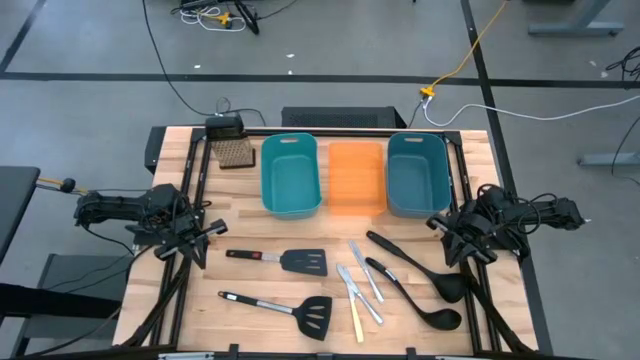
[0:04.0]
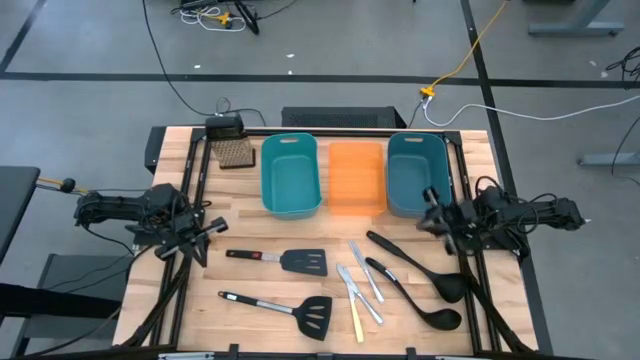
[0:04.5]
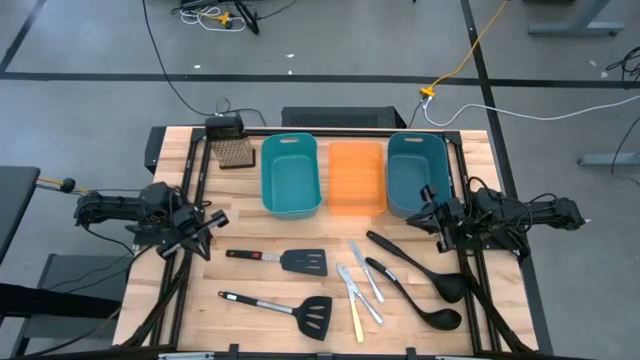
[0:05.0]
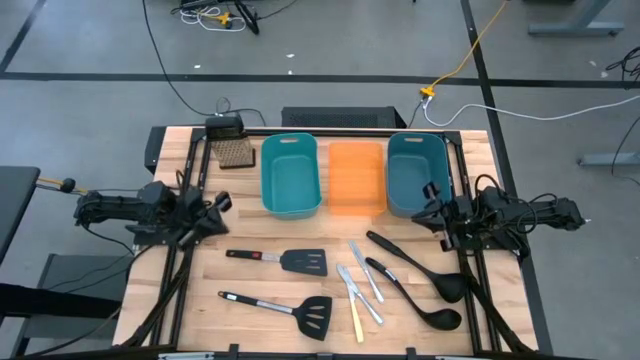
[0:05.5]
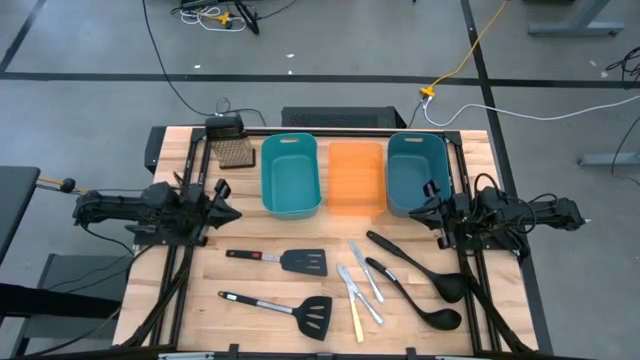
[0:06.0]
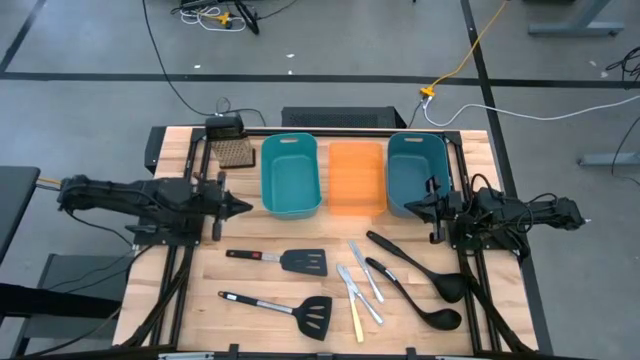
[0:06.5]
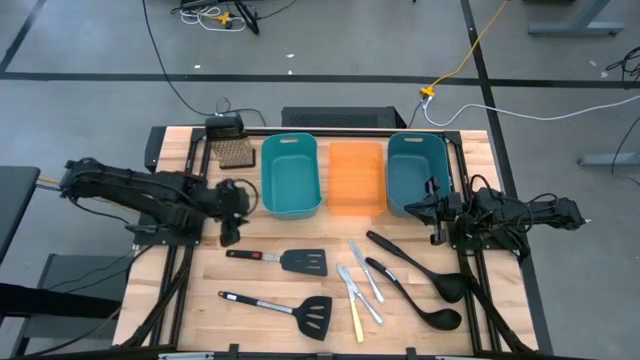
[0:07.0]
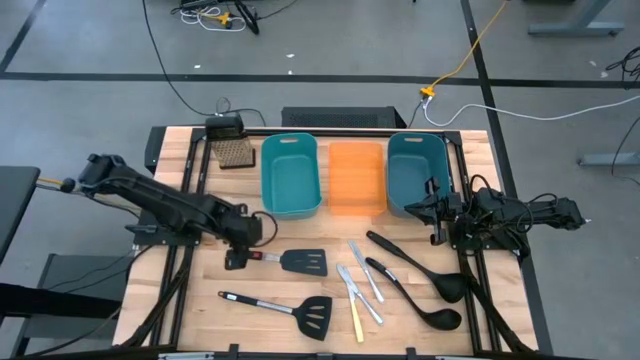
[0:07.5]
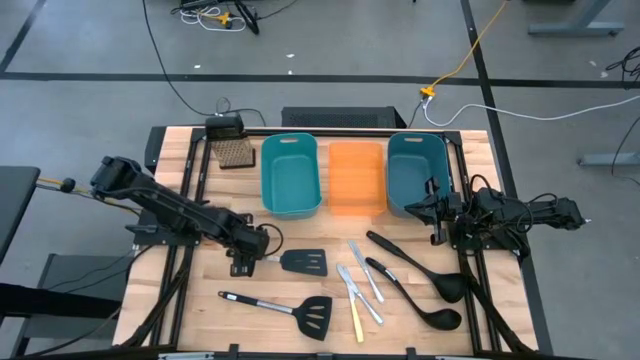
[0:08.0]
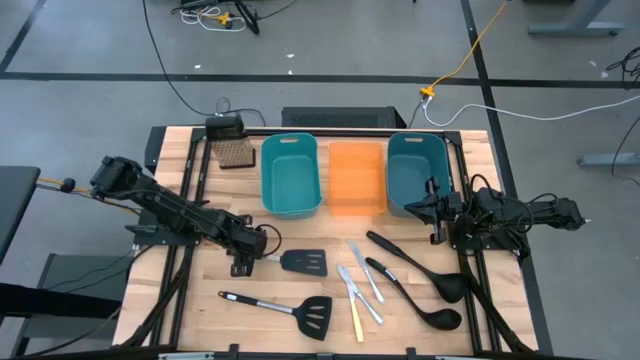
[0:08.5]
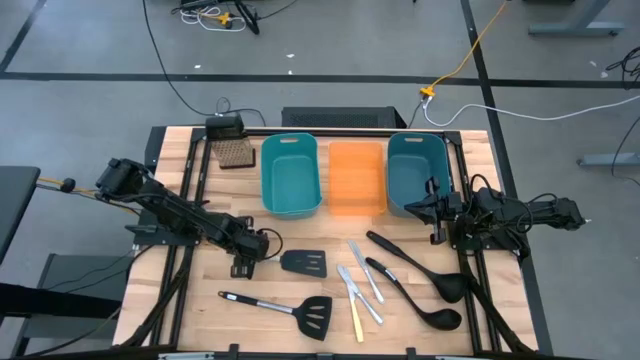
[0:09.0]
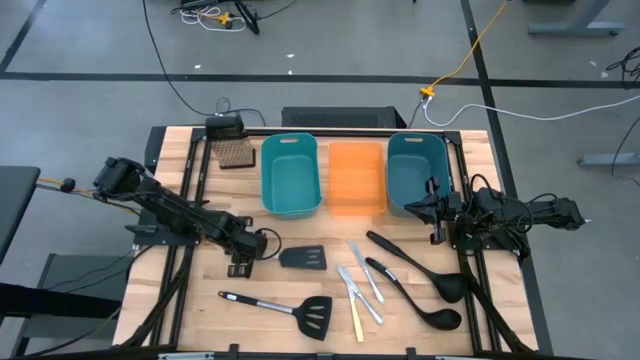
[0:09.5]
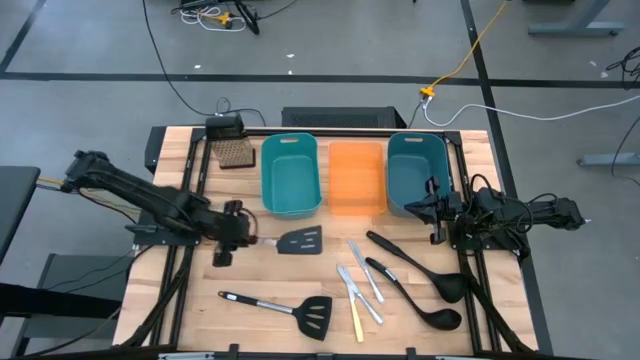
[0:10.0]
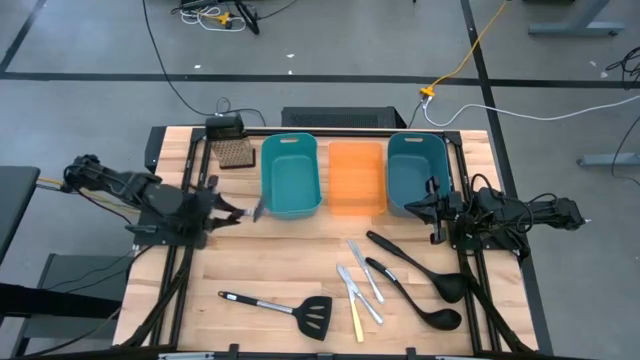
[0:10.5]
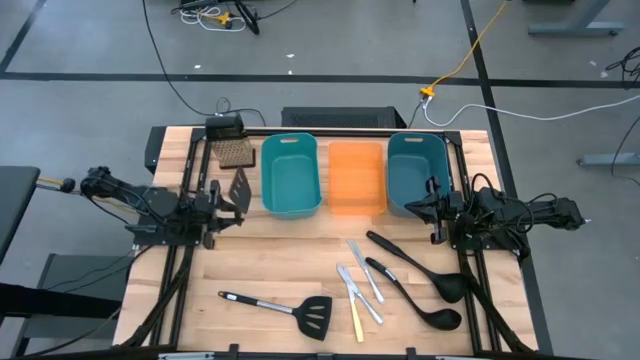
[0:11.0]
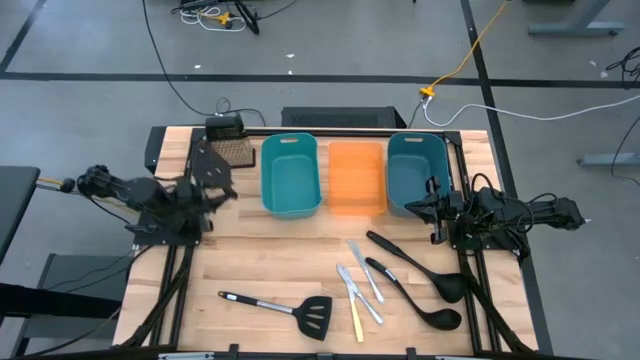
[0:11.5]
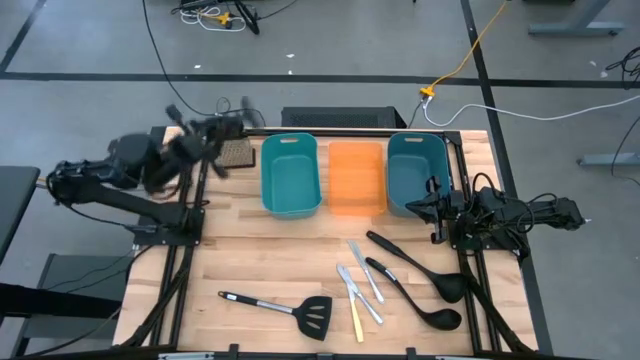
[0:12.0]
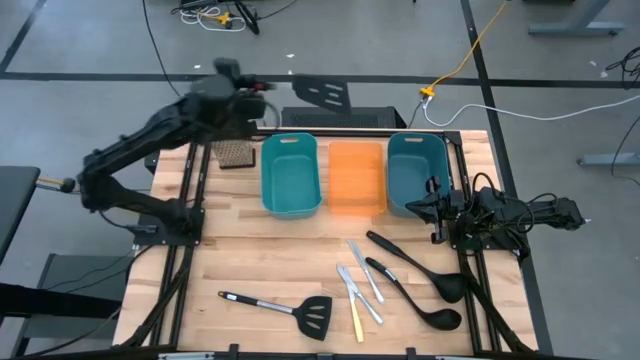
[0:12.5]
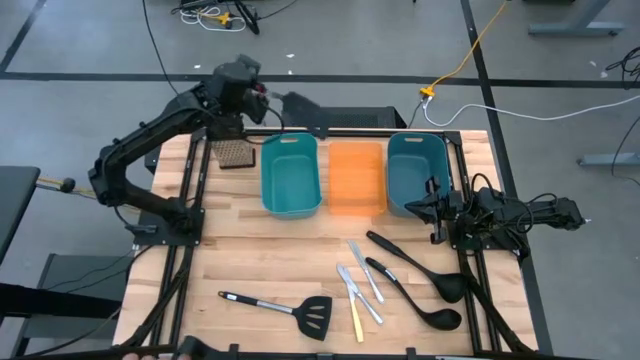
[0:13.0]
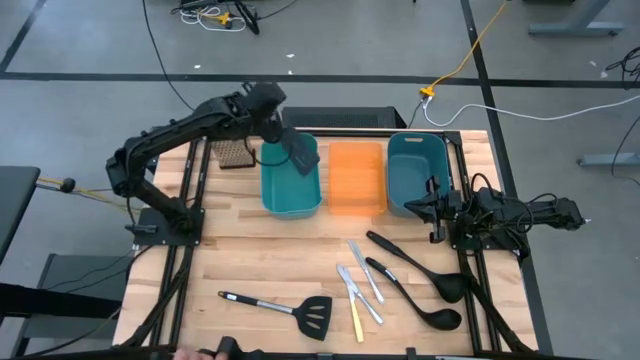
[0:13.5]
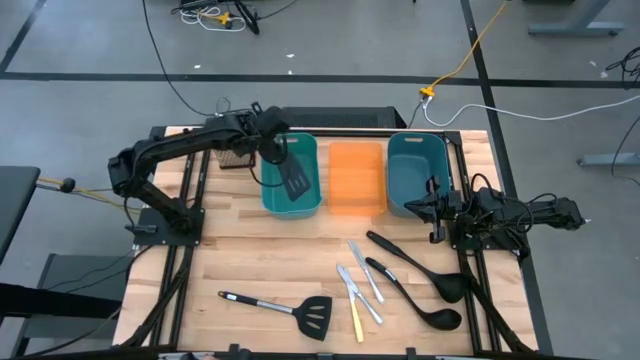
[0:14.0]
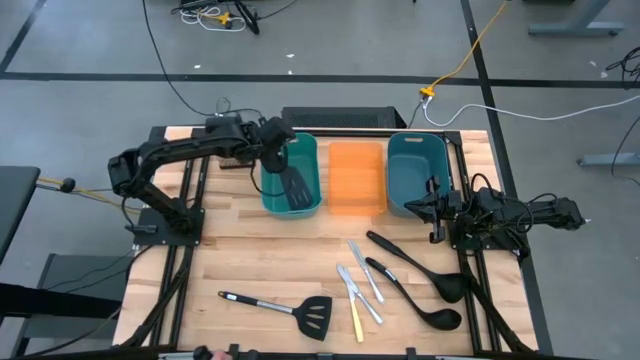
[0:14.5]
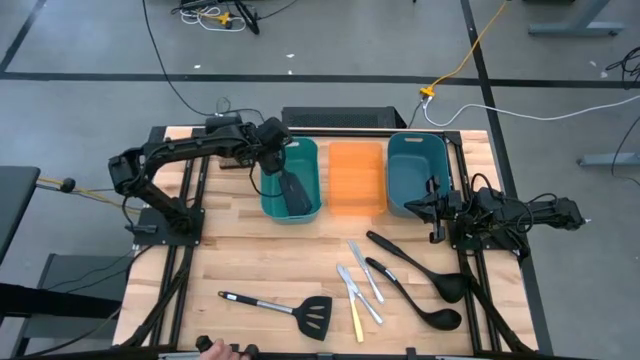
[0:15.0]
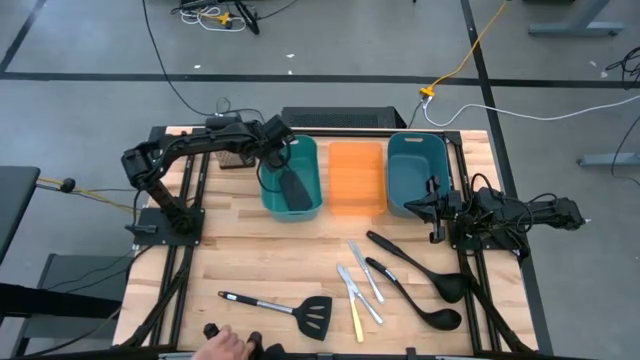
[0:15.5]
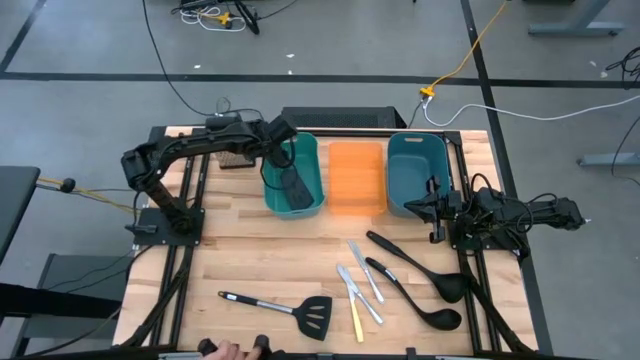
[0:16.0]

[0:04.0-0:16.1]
Task: Pick & Place Kitchen Items
Put the top spatula into the green container

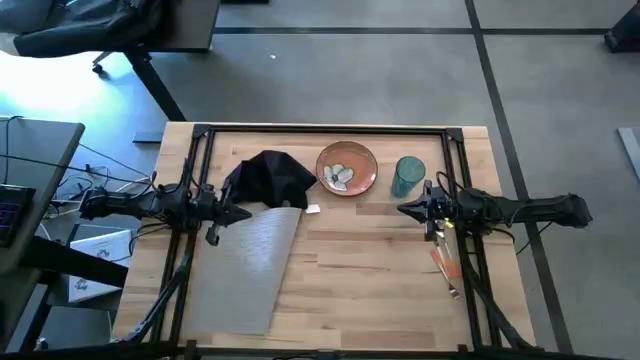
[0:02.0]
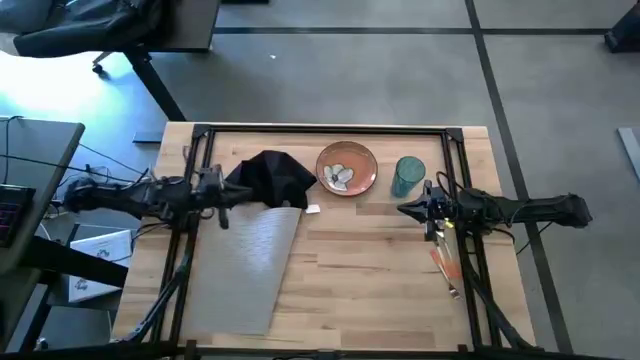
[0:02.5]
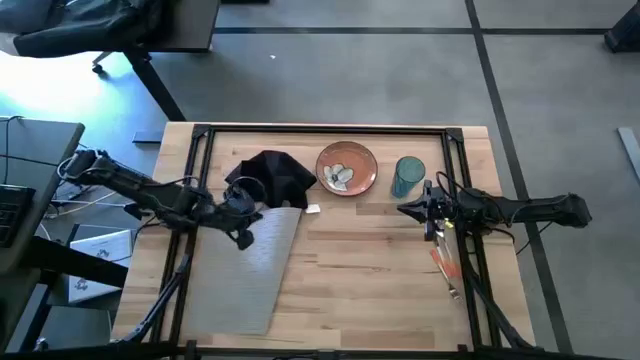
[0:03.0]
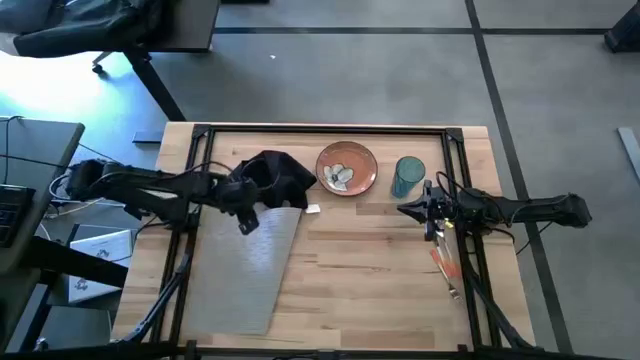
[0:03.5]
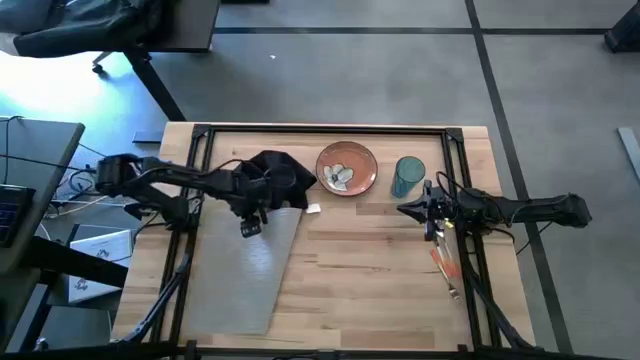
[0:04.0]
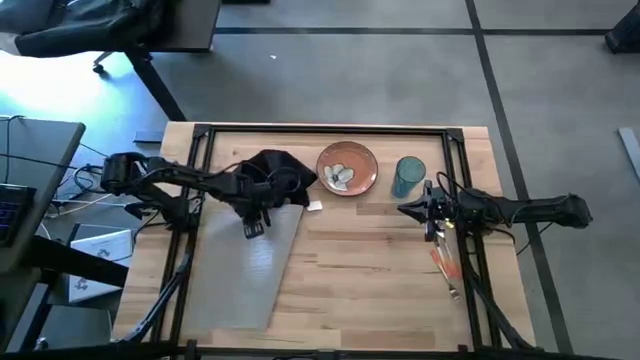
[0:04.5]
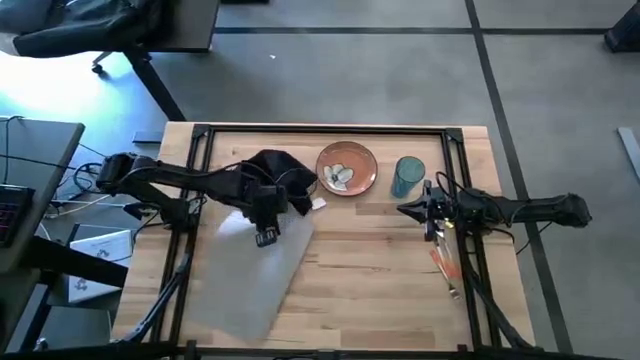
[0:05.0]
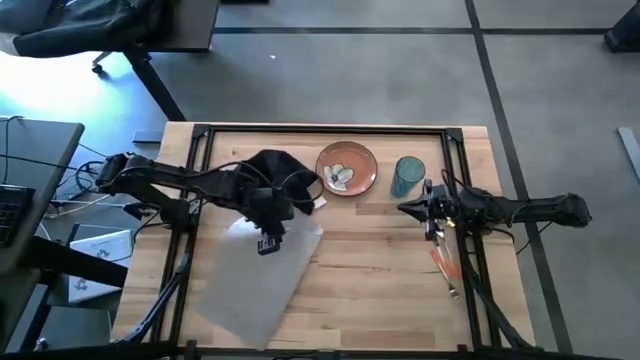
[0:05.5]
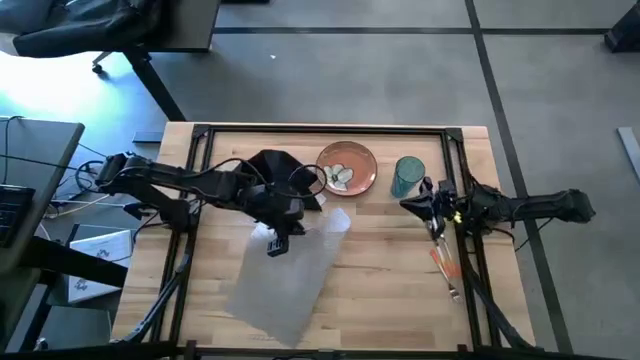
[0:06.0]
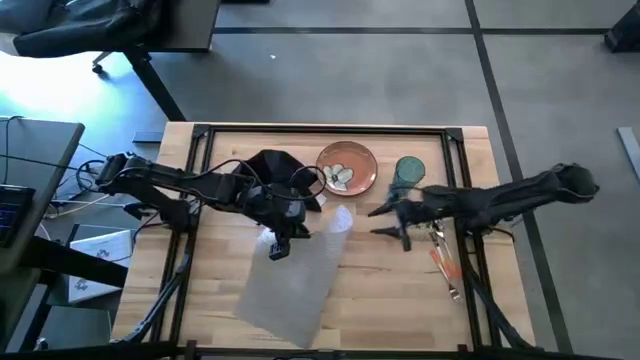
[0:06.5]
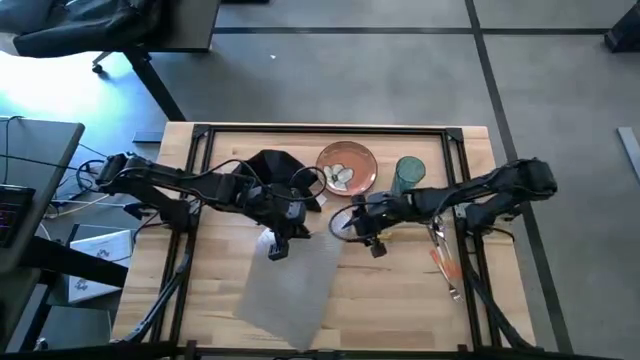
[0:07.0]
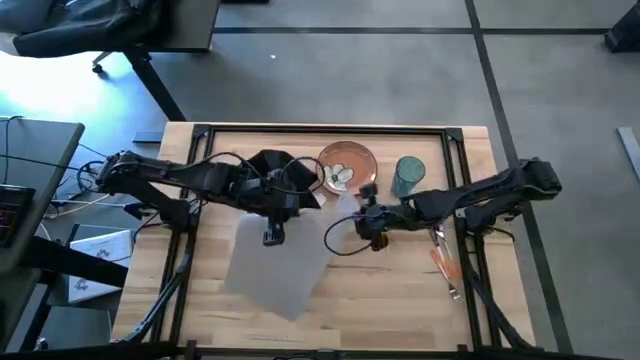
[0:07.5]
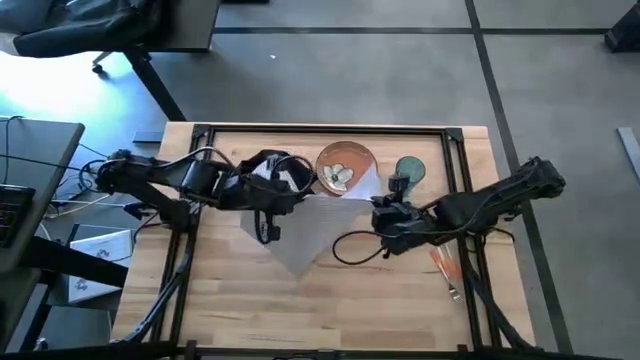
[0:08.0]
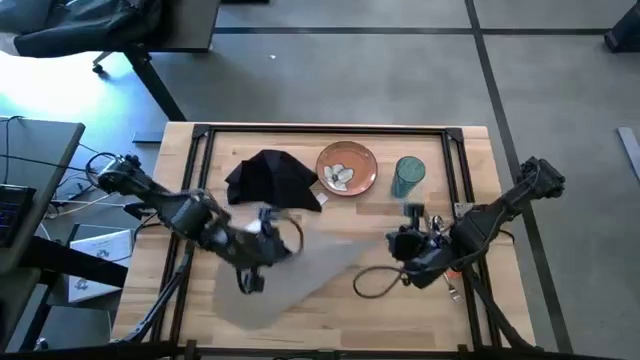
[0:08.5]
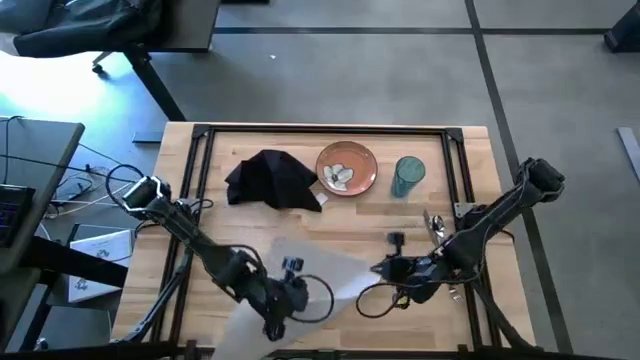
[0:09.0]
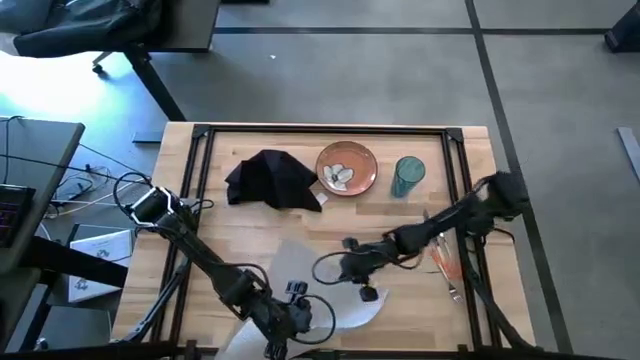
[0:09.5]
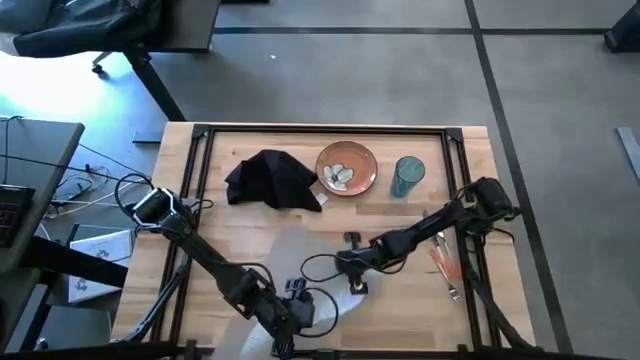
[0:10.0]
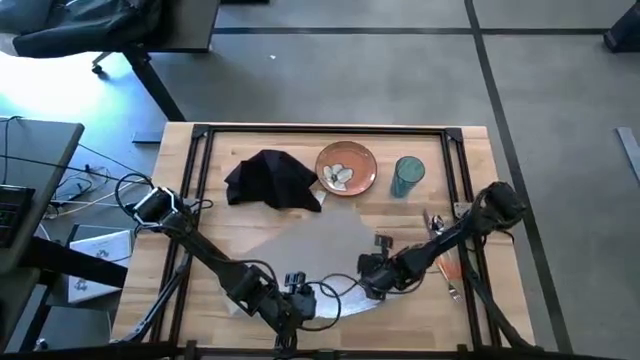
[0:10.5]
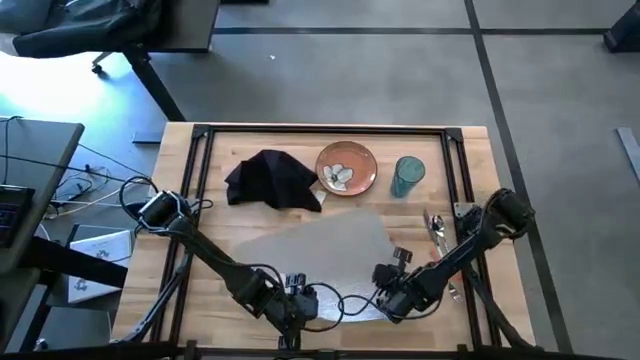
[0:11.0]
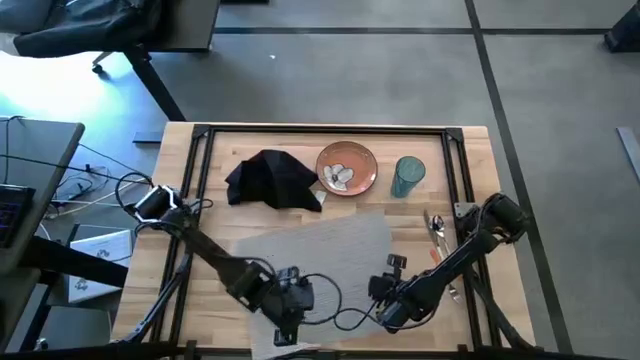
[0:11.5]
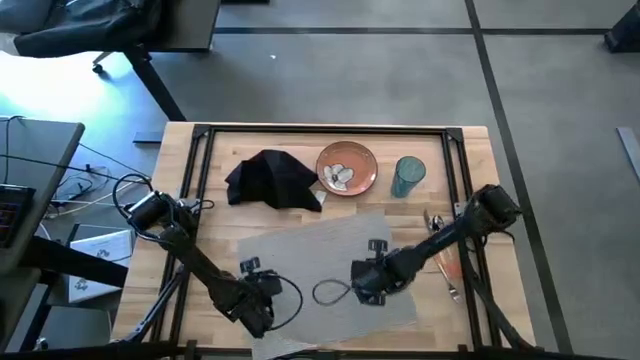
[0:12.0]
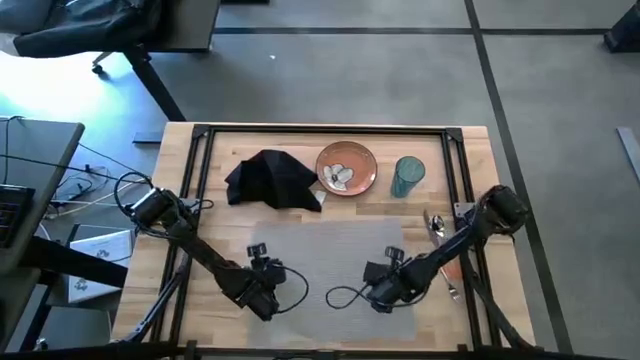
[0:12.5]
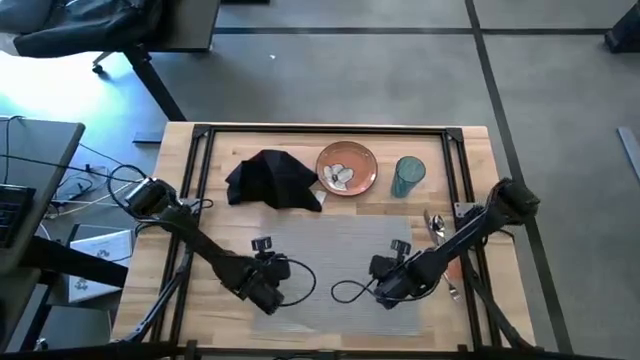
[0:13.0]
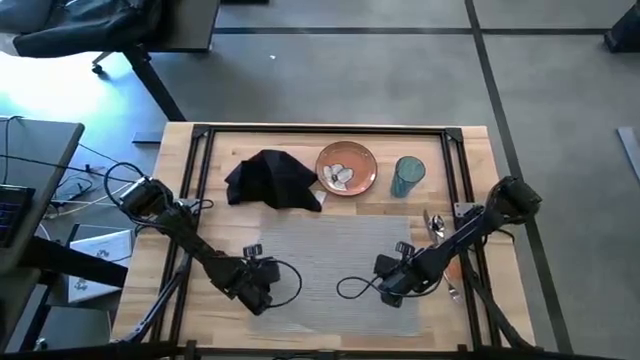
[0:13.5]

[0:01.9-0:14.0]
Task: Set table place
Prepare the gray tablemat
